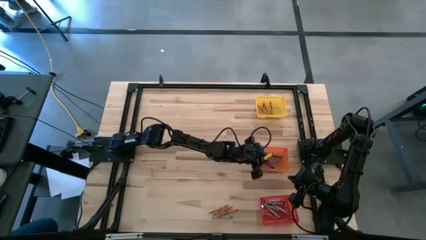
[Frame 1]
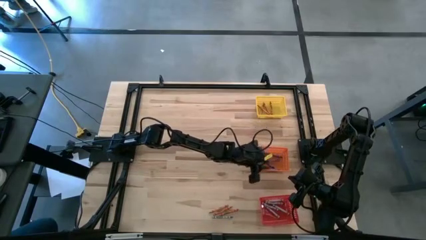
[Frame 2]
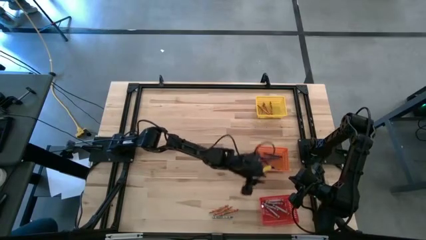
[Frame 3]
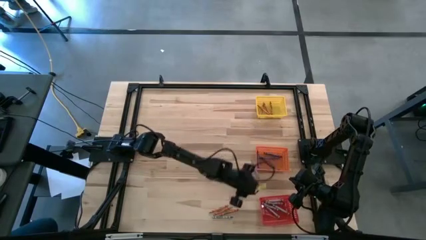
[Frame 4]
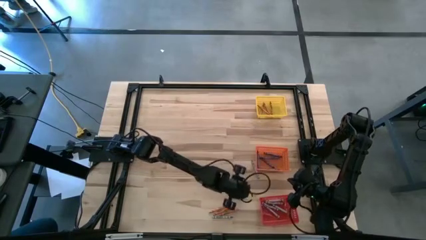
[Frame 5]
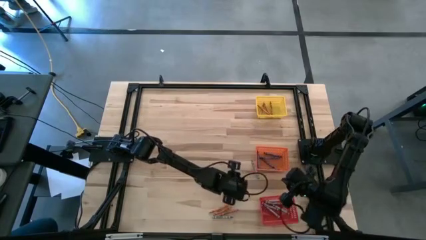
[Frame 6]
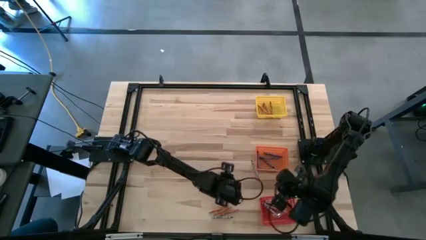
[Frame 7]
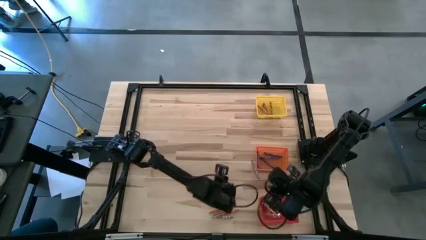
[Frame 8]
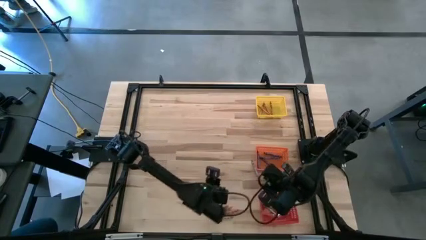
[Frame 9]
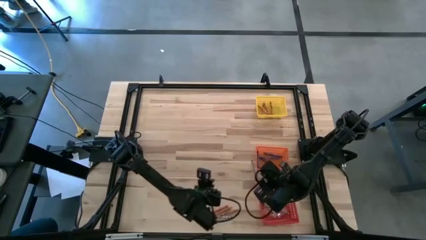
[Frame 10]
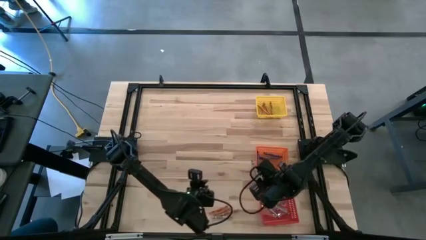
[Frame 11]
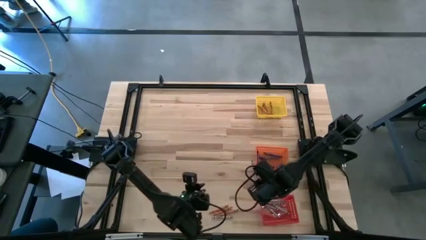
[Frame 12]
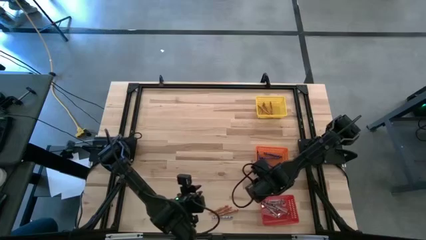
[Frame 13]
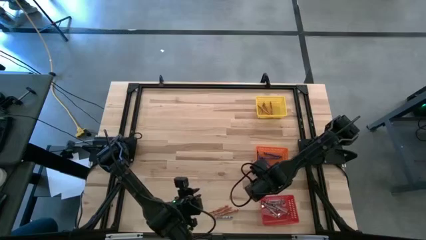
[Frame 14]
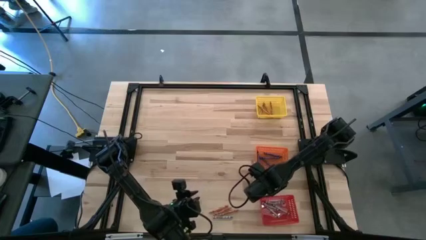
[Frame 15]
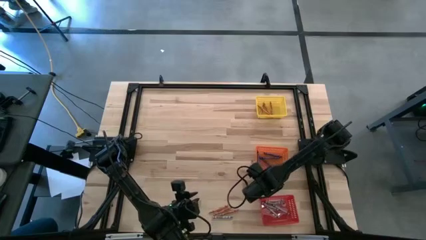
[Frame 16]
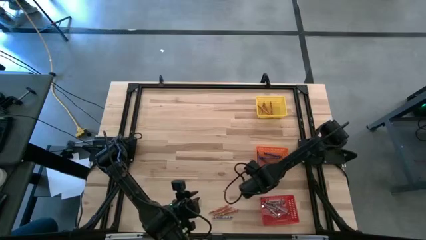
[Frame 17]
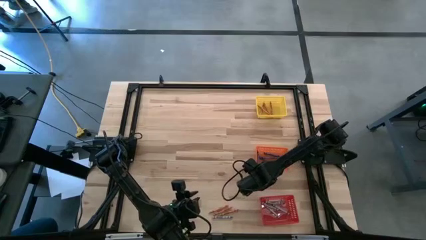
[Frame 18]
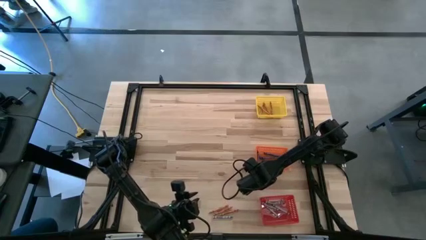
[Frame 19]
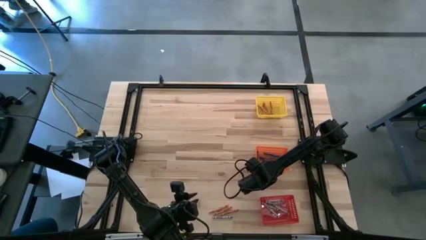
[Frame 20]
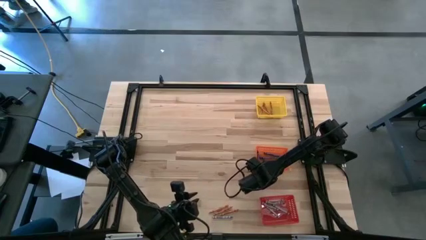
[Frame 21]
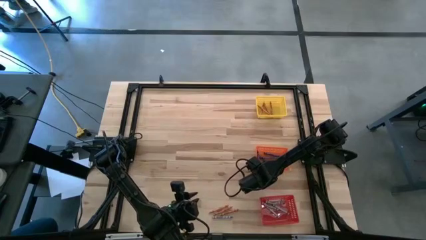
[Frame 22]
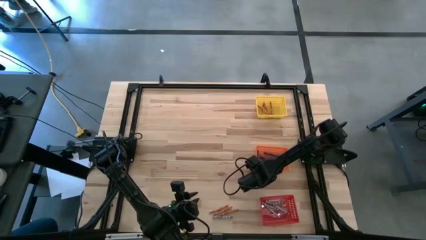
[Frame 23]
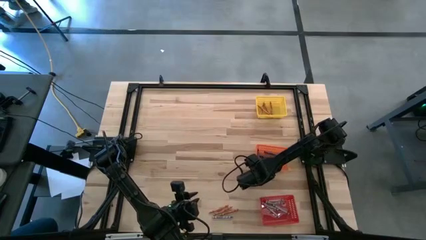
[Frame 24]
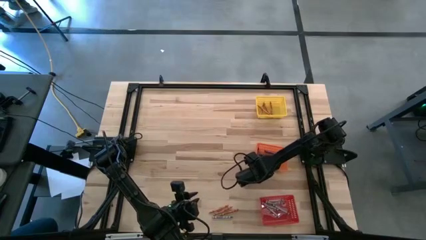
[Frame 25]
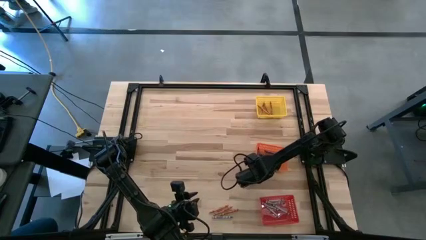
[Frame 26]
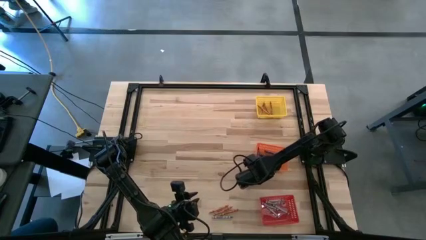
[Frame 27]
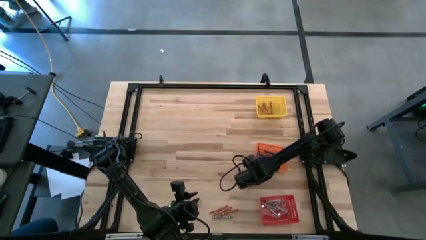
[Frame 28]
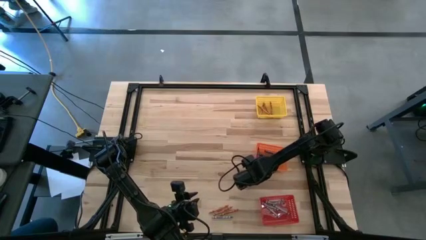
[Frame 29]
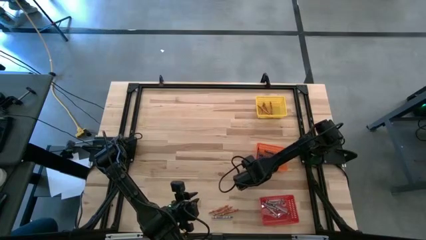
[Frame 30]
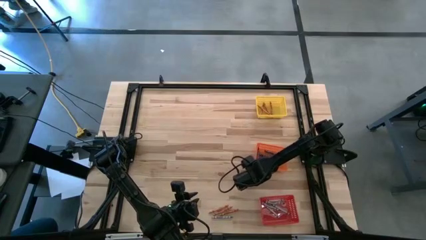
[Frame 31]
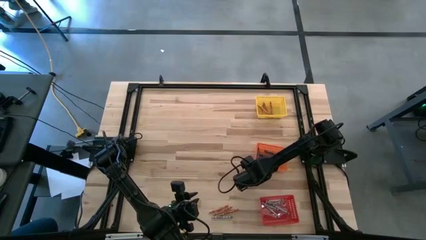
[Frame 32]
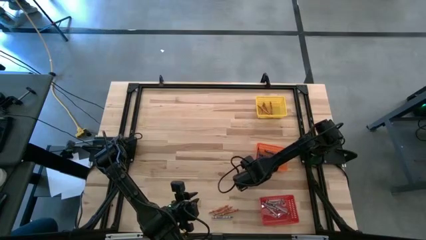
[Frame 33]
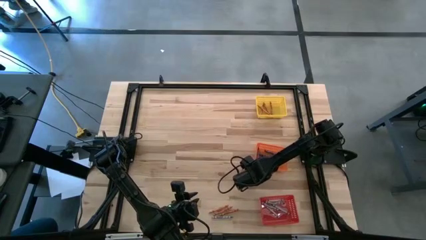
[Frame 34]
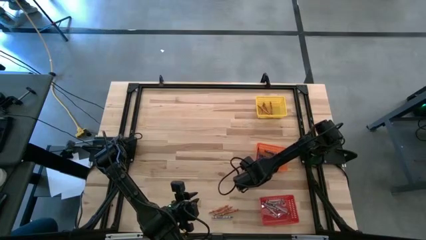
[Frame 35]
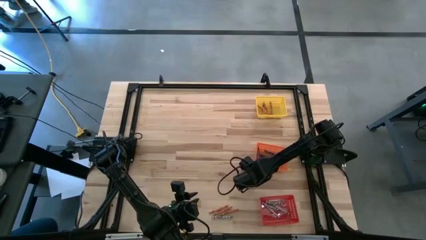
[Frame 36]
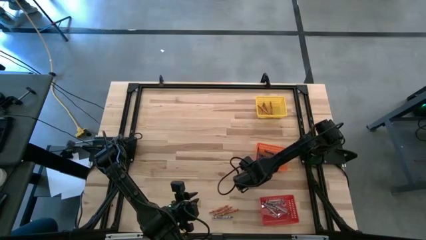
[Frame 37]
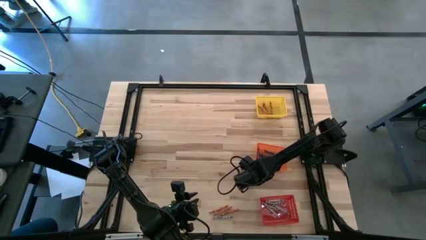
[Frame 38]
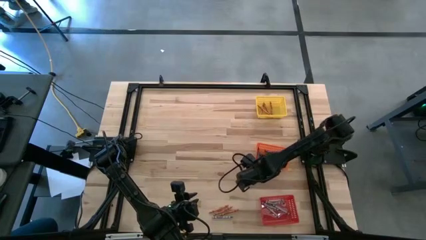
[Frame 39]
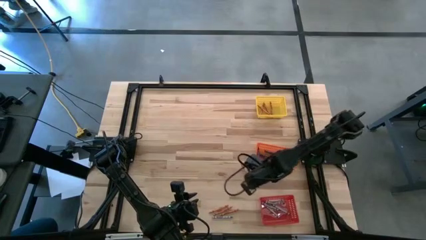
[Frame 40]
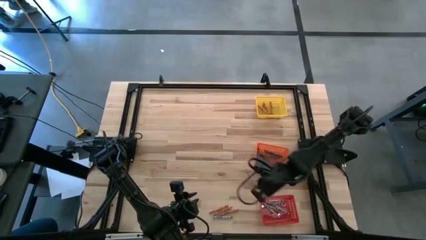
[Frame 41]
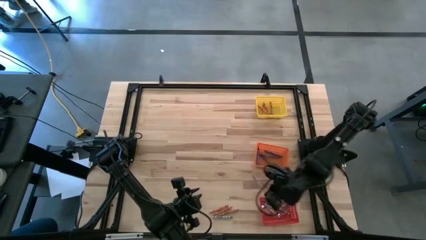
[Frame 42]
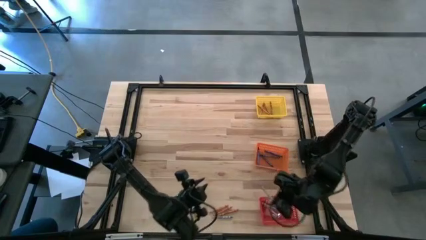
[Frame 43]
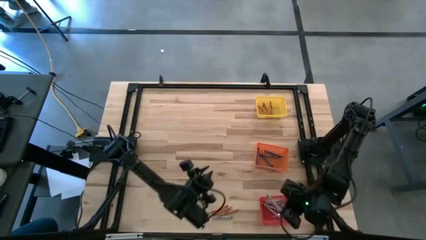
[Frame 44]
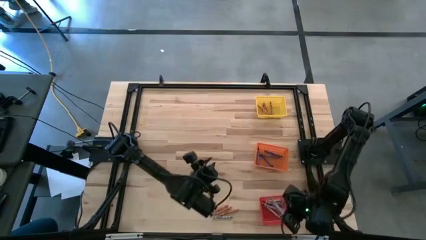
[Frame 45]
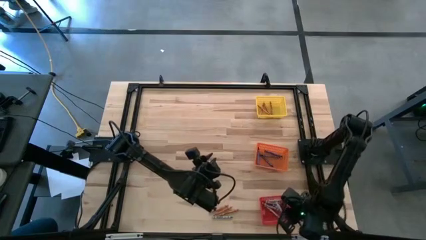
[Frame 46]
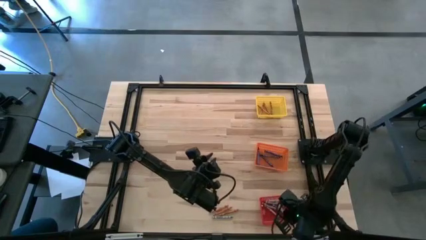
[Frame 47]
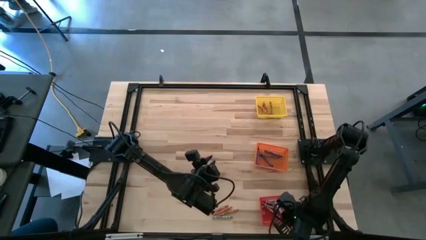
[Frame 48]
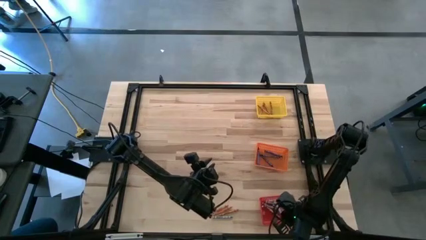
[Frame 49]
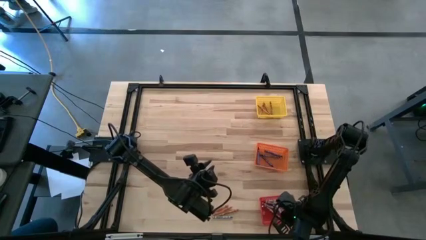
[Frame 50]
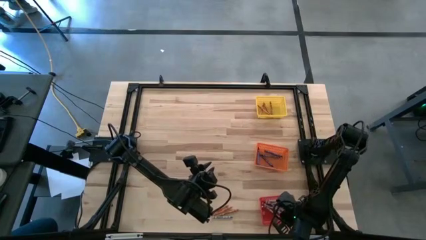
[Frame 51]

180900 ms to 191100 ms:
Task: Sort crayons
Put the gray crayon into the red bin
